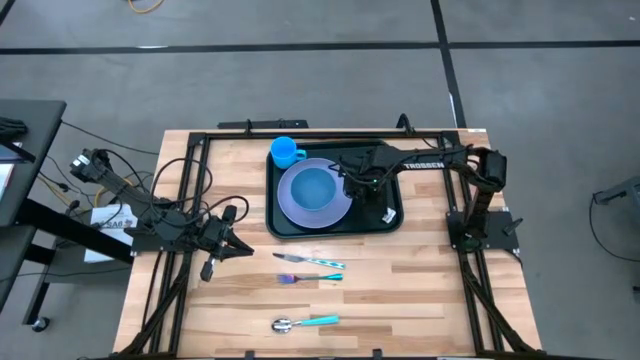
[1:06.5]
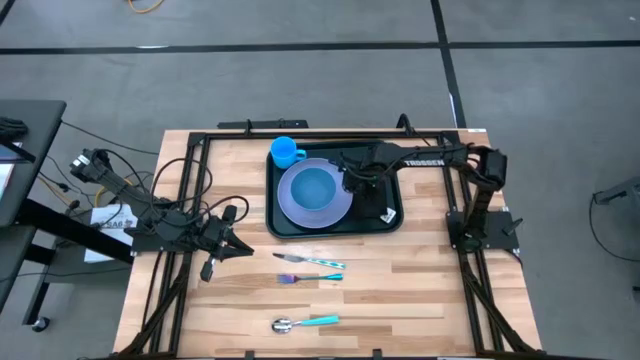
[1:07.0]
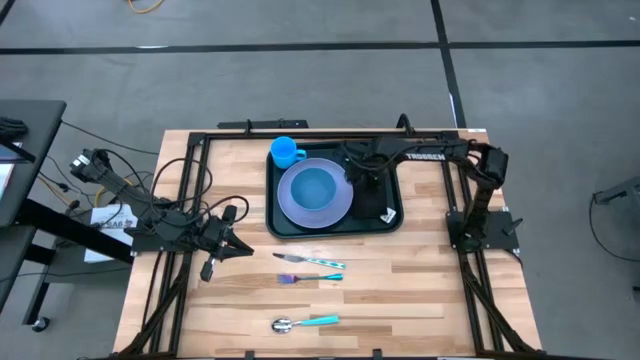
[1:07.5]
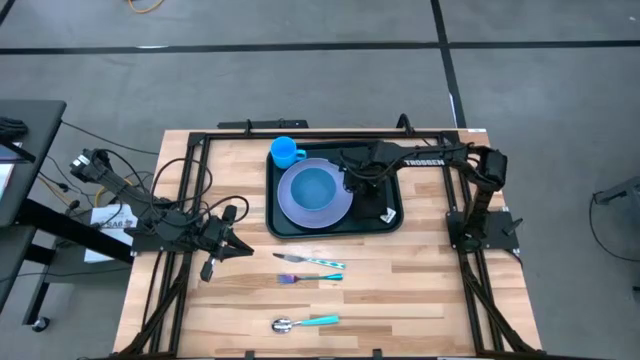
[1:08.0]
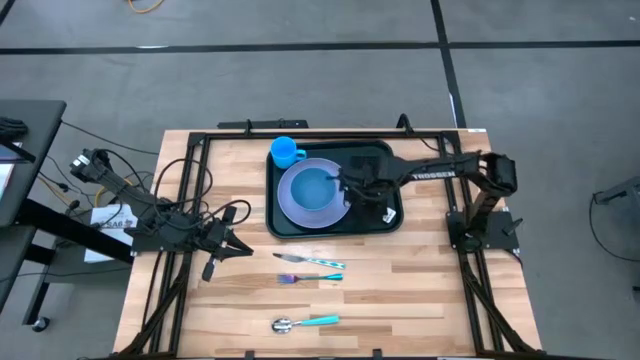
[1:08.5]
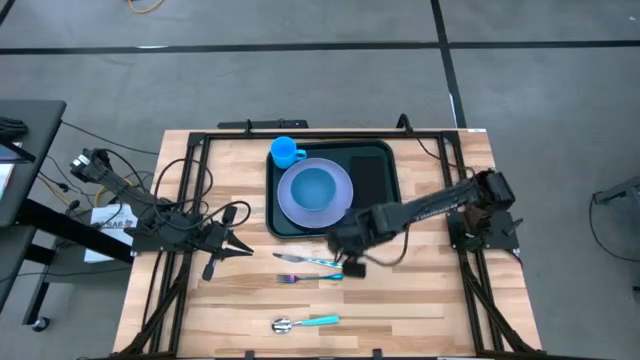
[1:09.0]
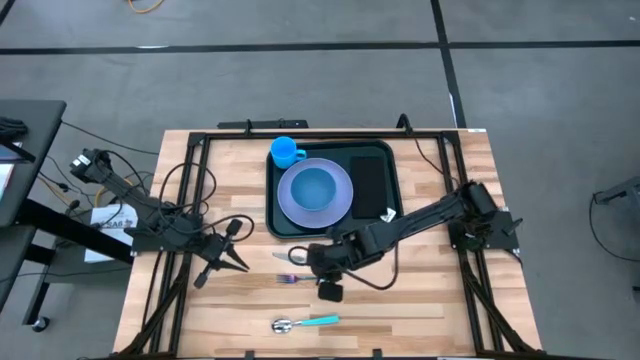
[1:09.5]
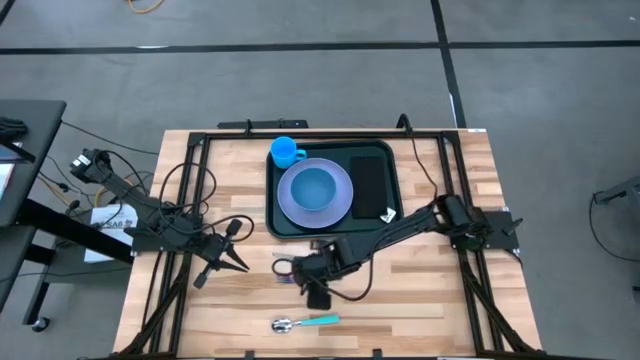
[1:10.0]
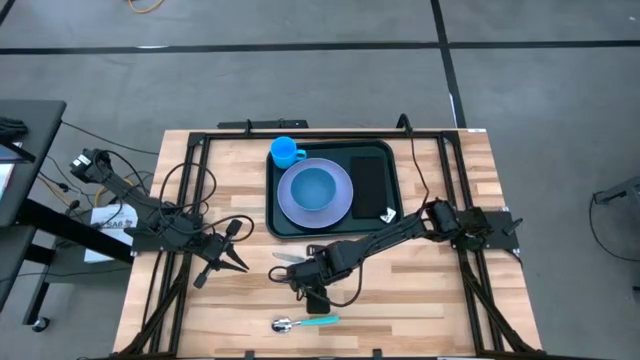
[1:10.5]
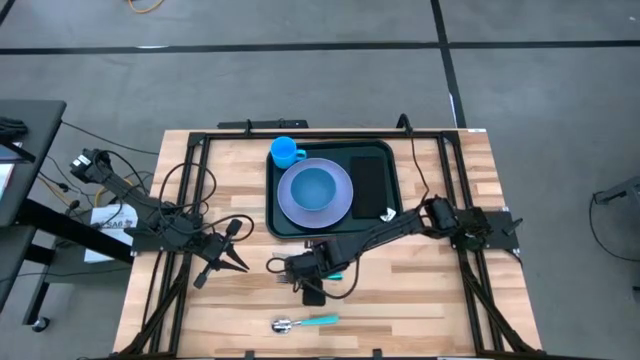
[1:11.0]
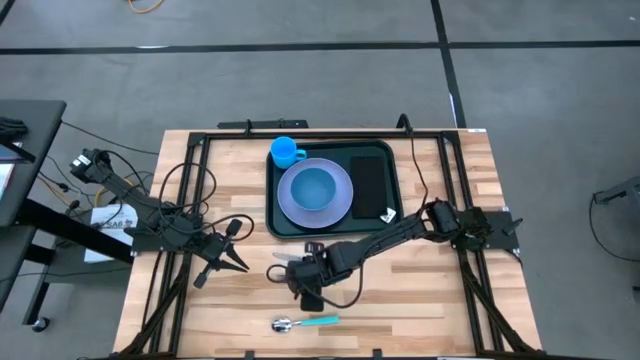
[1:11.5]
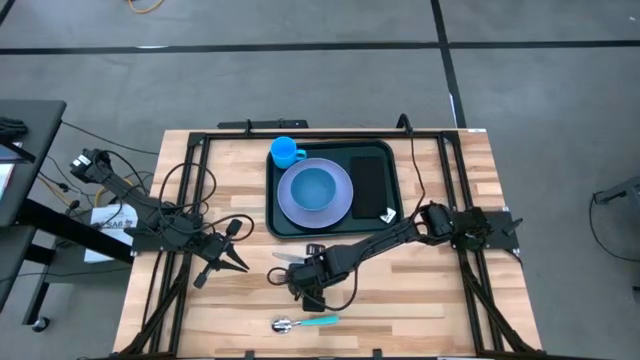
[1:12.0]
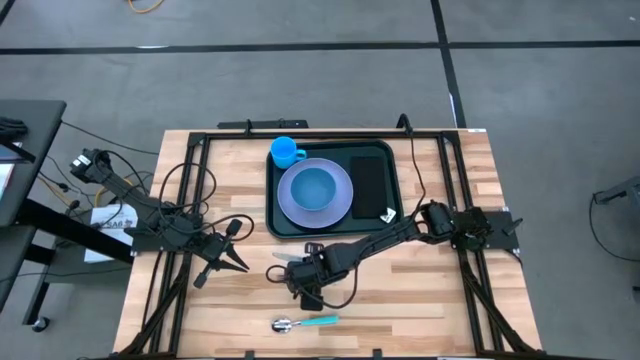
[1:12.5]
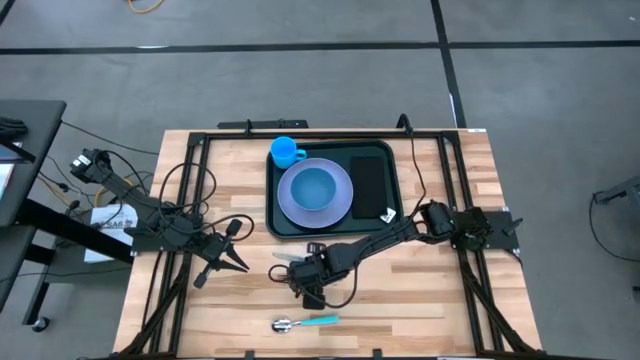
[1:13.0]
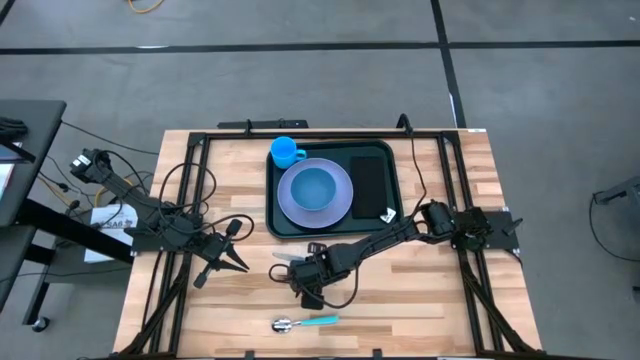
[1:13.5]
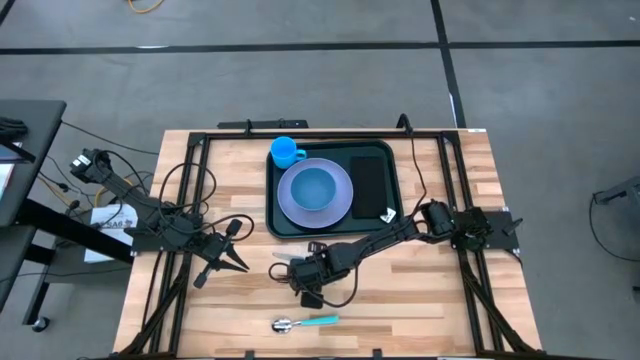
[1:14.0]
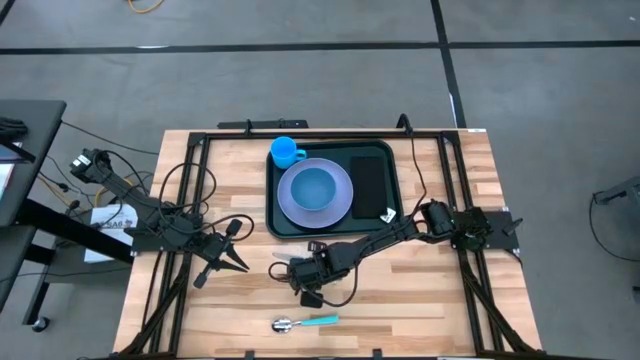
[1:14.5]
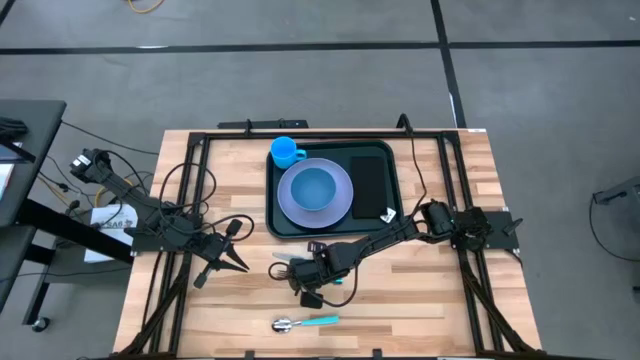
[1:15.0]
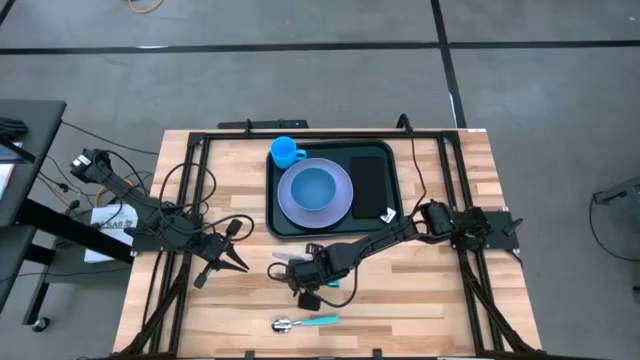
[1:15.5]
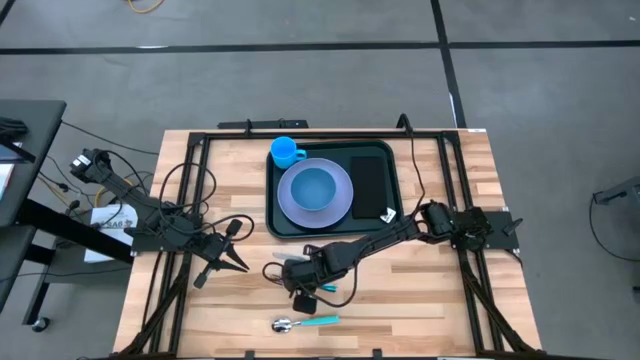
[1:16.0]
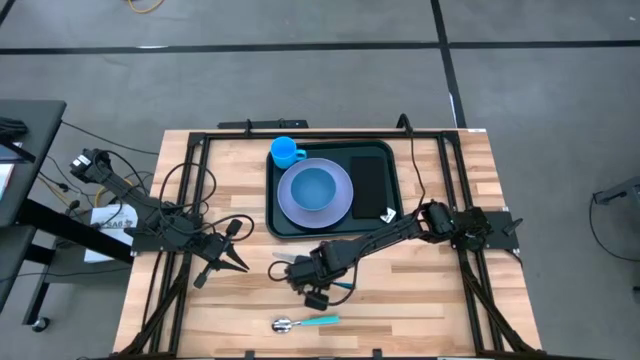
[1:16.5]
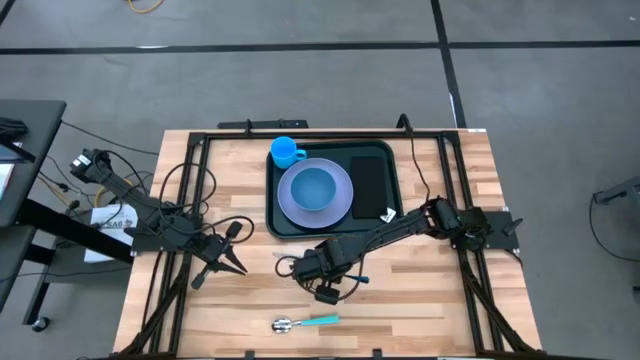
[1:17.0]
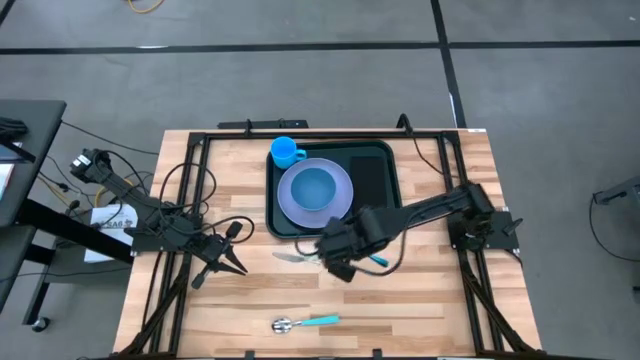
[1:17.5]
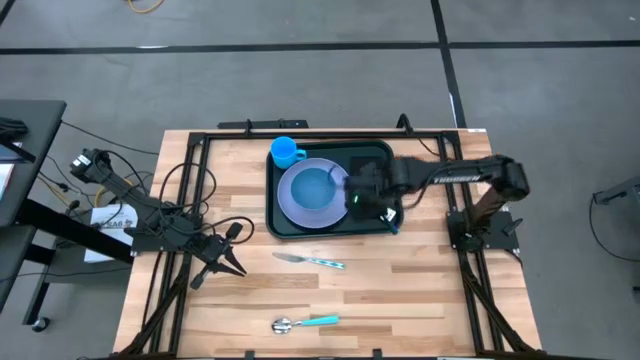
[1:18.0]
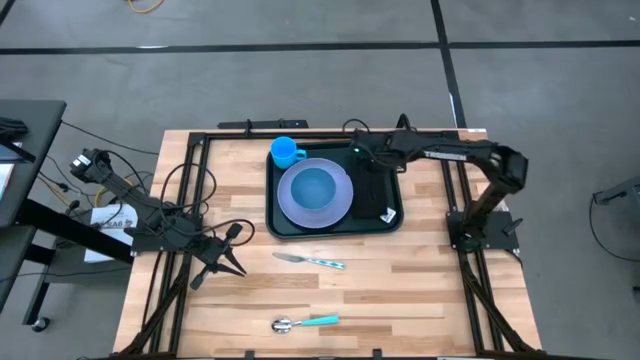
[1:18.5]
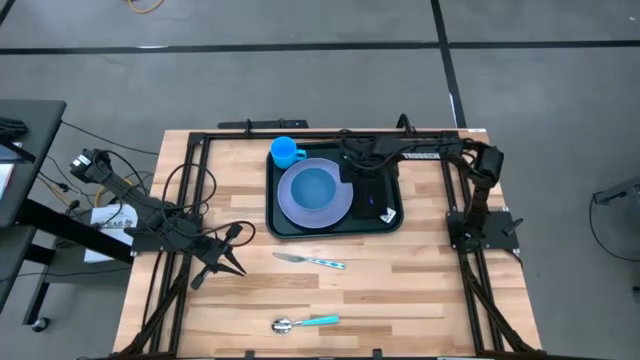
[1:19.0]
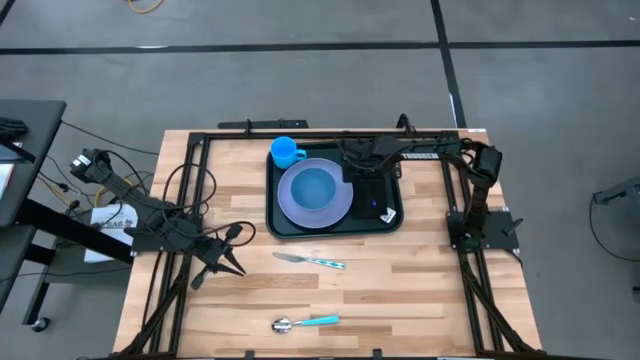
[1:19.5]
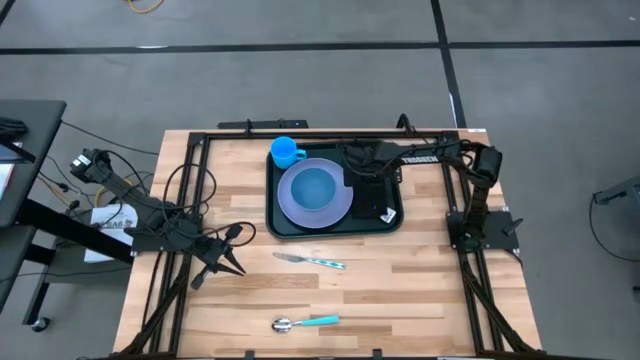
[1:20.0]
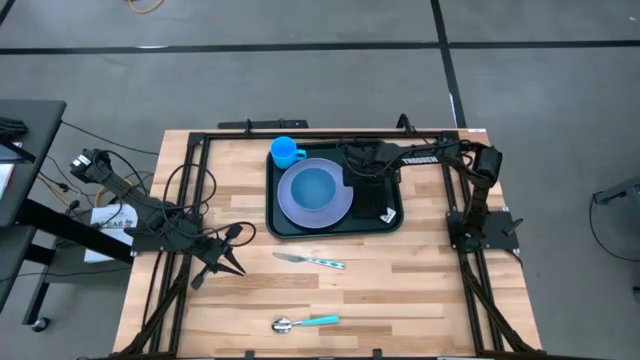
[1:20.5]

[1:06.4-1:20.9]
Task: Set up tray
Put the blue fork on the black napkin
